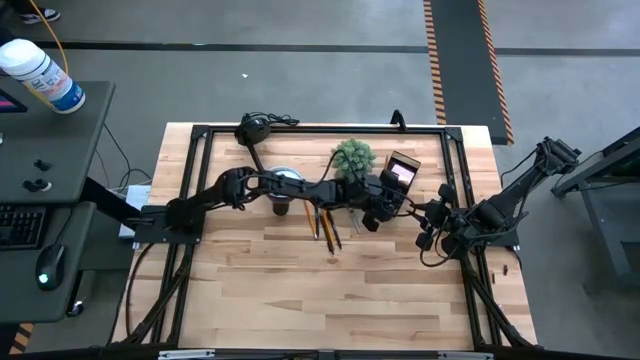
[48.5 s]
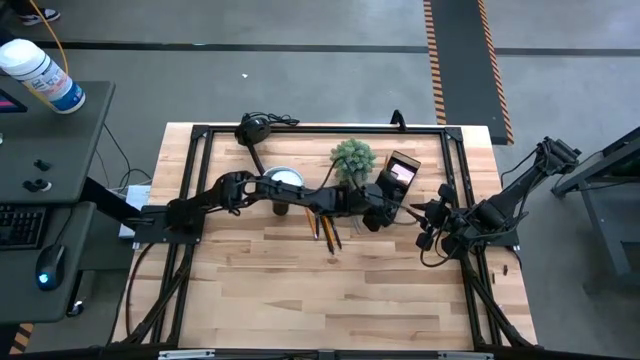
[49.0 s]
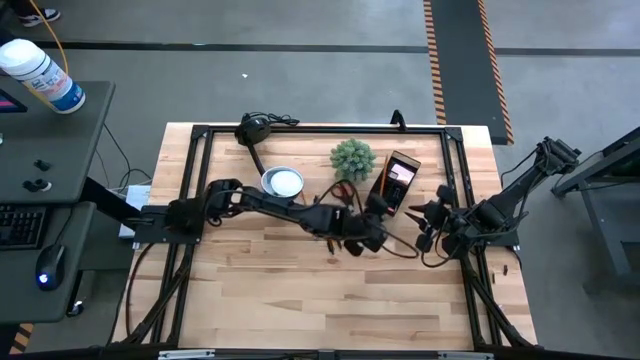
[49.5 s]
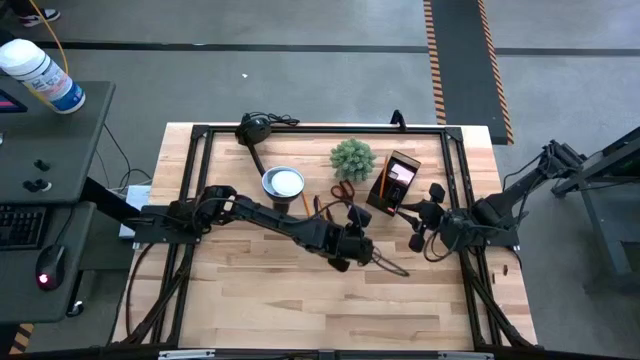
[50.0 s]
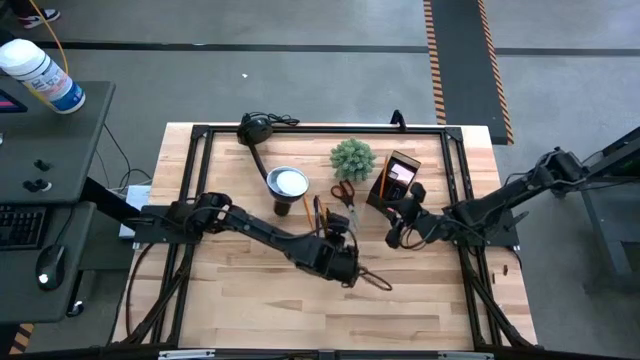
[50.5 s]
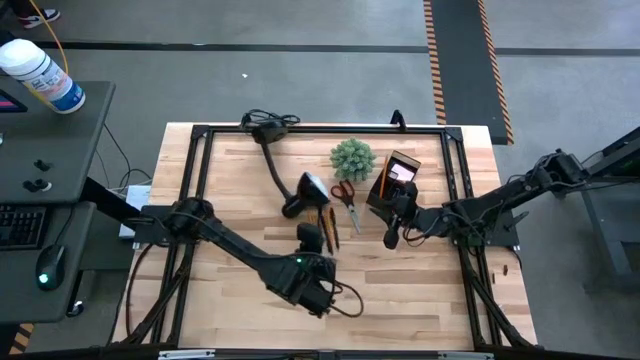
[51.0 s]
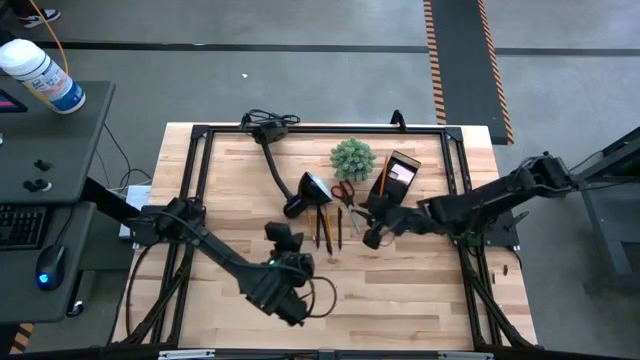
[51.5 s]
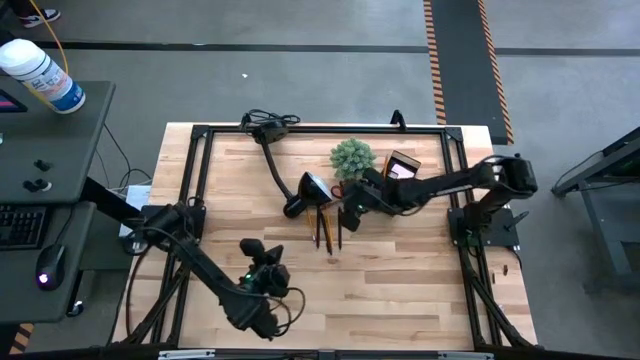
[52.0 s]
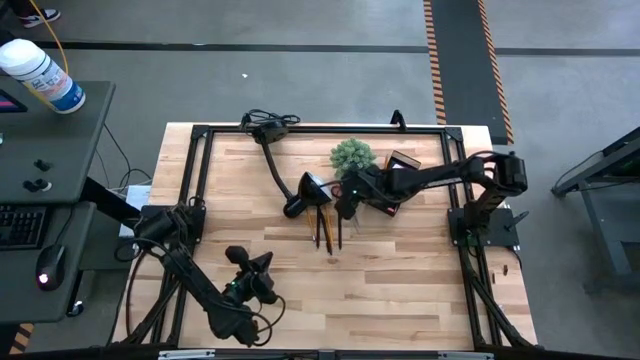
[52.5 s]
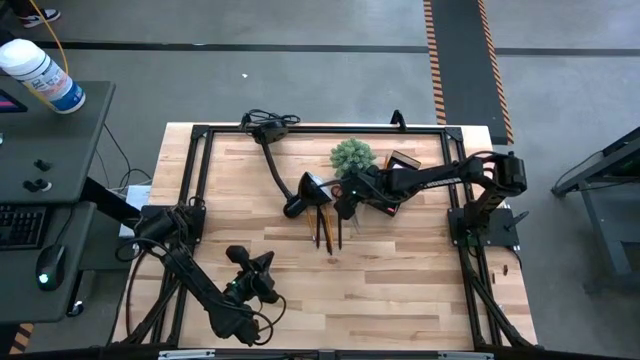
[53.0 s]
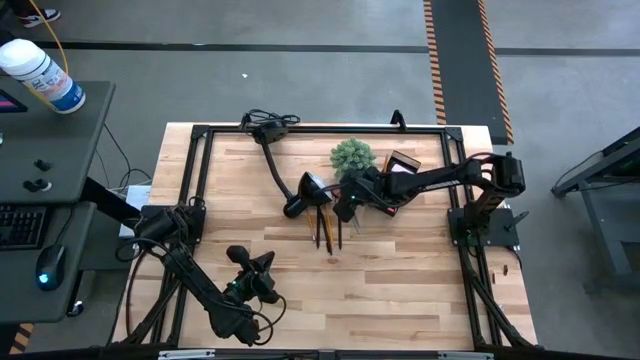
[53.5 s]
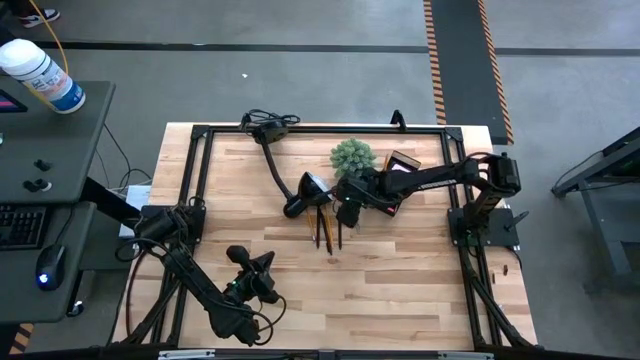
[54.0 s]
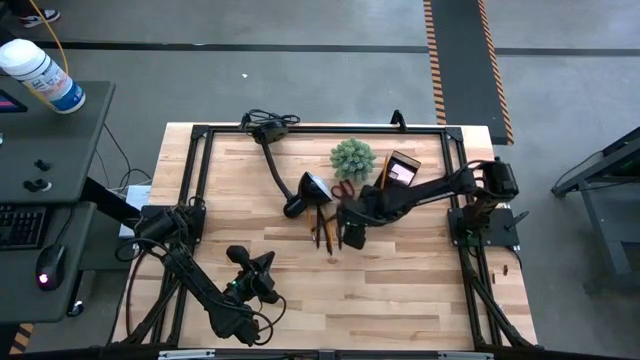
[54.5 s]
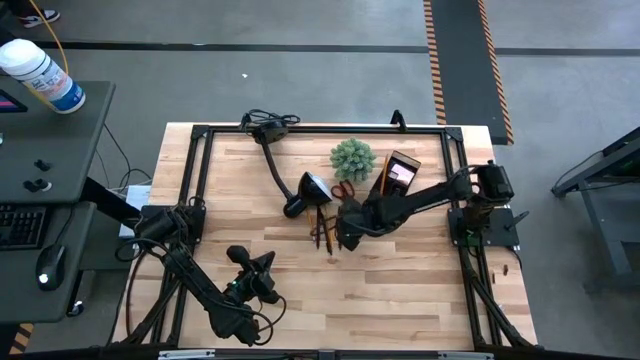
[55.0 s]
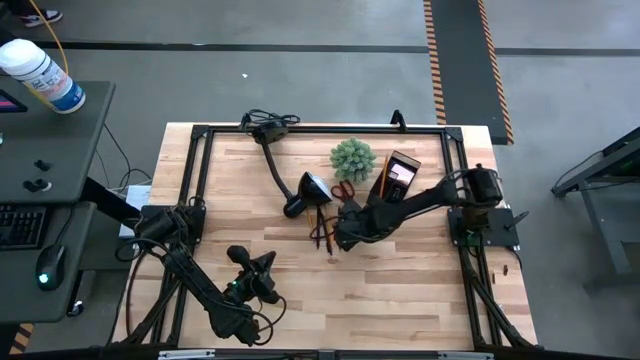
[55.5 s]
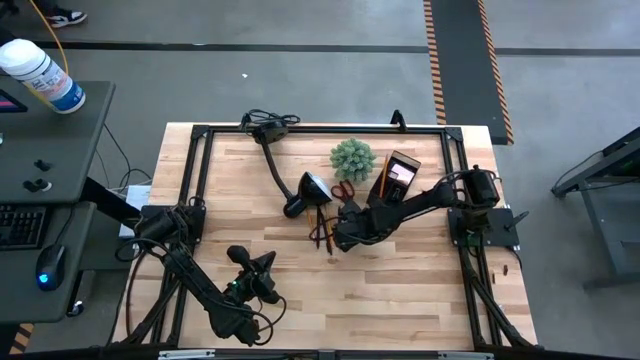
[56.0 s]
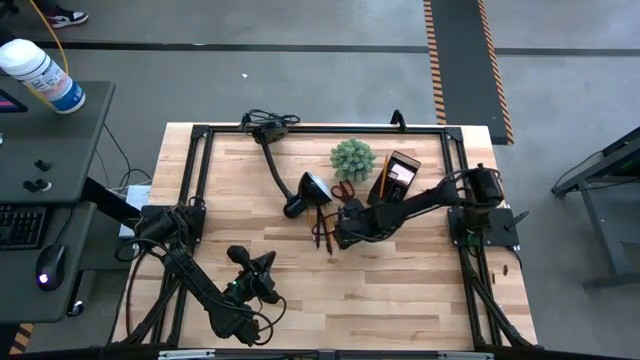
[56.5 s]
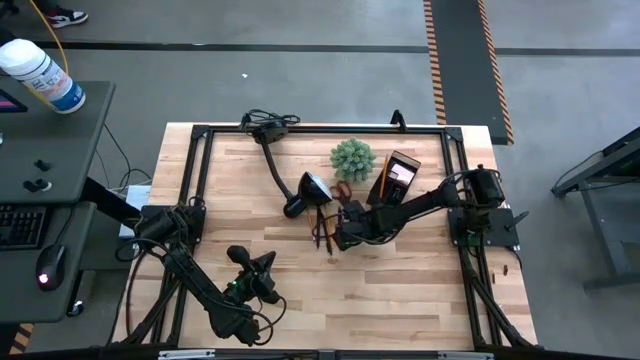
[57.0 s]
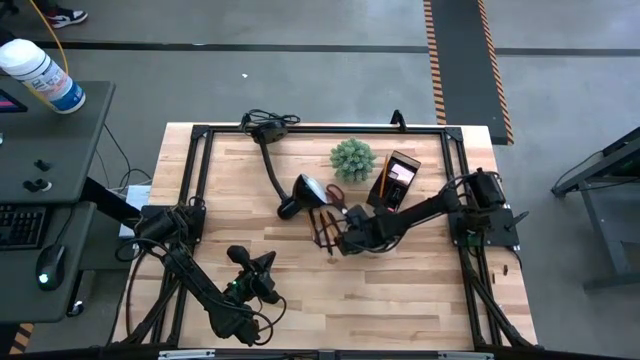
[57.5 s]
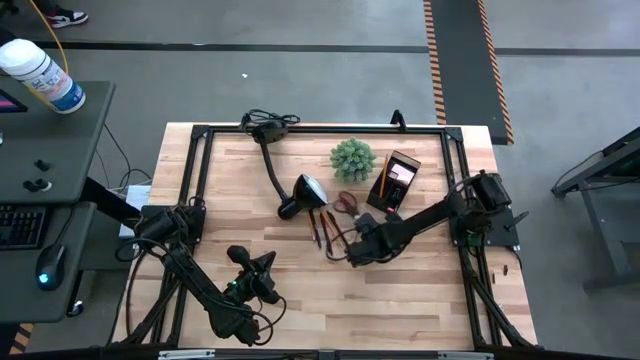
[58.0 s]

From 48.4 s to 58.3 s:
Task: Pick and place office supplies into organizer
Put the black scissors into the desk organizer

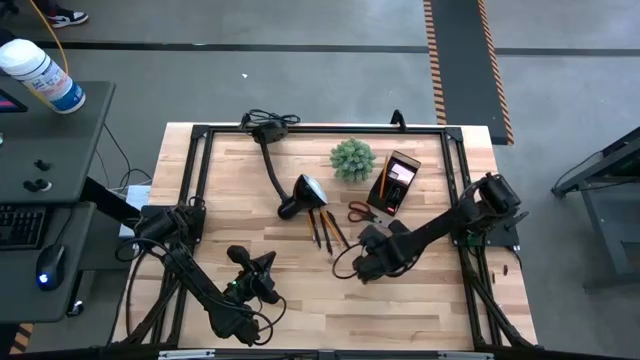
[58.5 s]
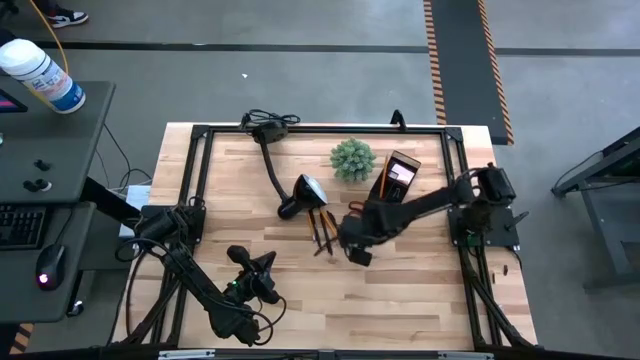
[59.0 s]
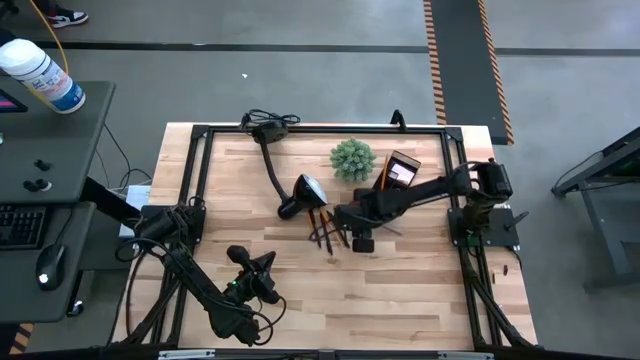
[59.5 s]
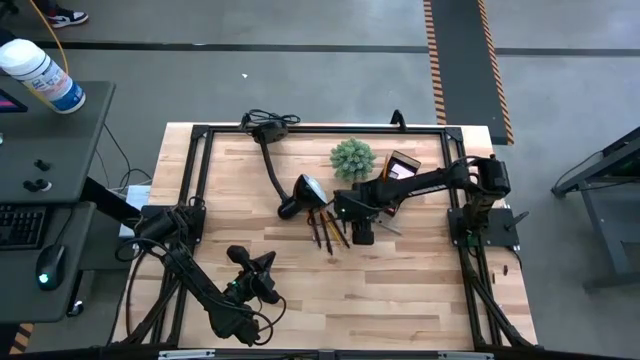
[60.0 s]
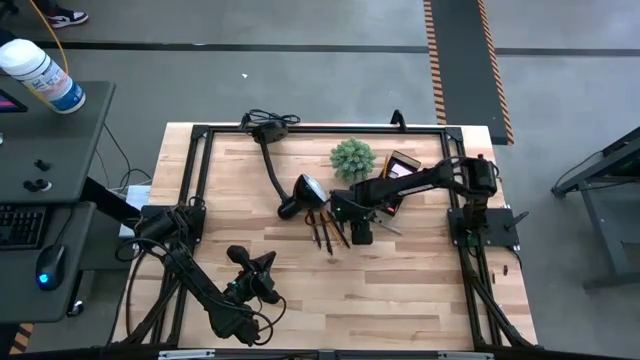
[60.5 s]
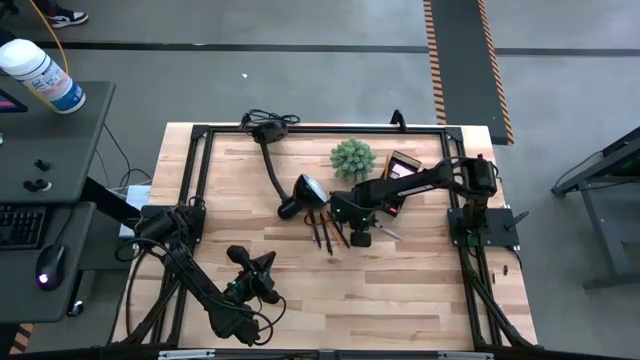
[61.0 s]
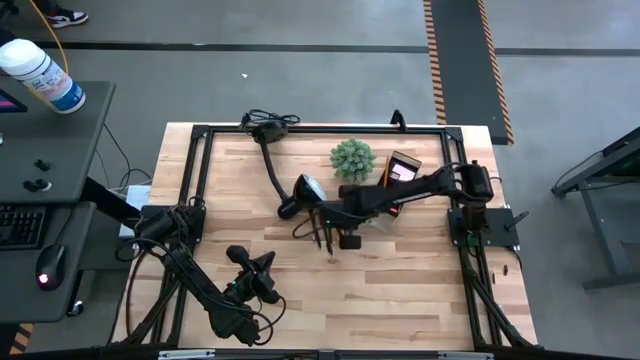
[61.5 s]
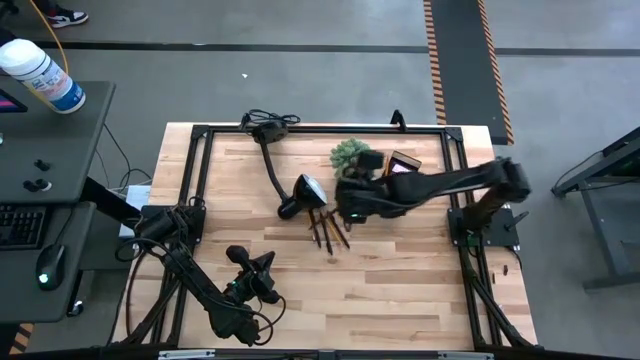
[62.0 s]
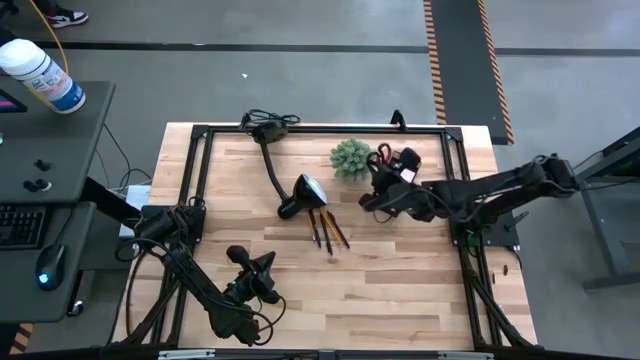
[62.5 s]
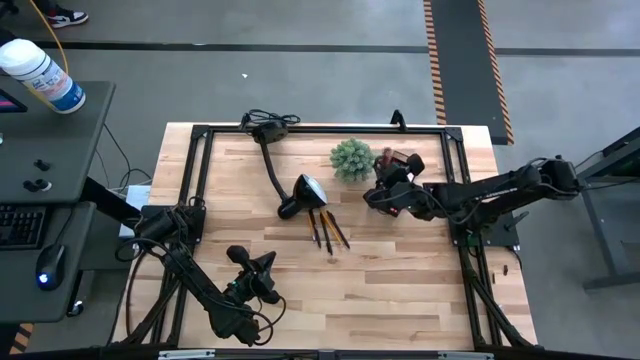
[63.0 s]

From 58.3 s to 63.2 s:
Put the black scissors into the desk organizer

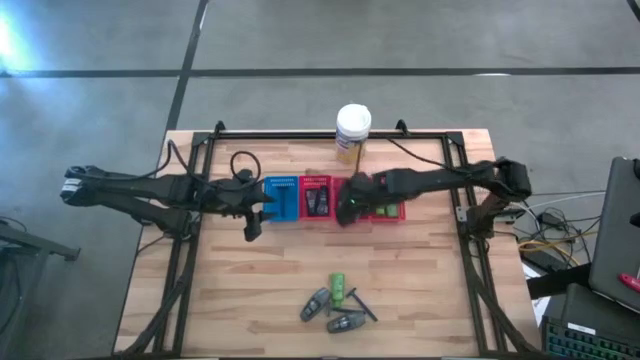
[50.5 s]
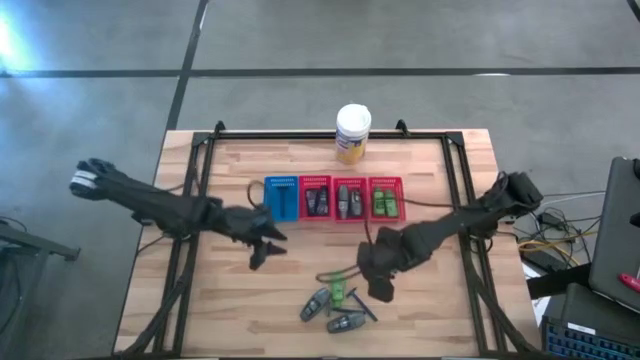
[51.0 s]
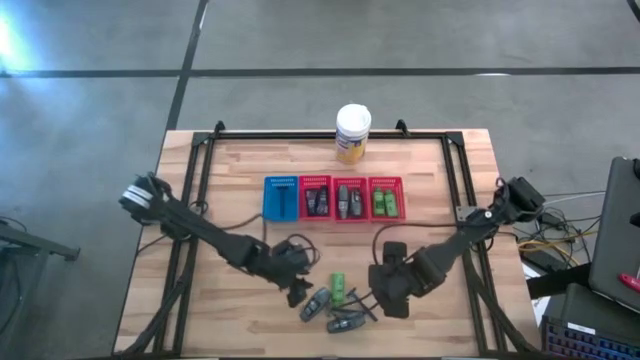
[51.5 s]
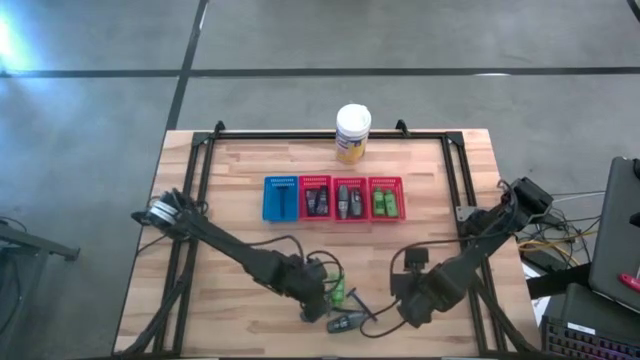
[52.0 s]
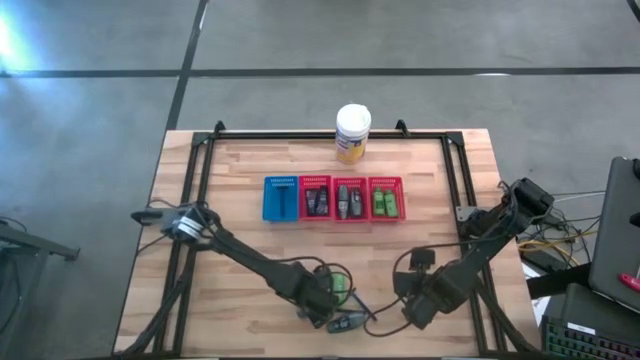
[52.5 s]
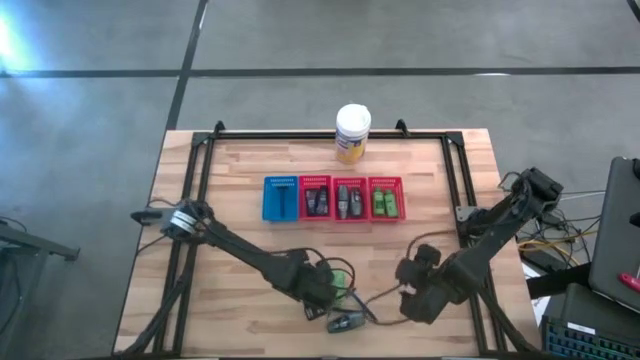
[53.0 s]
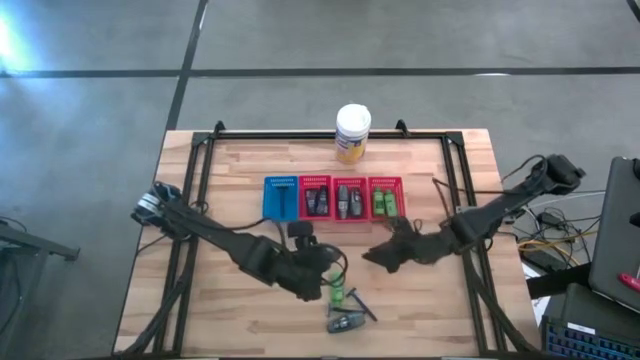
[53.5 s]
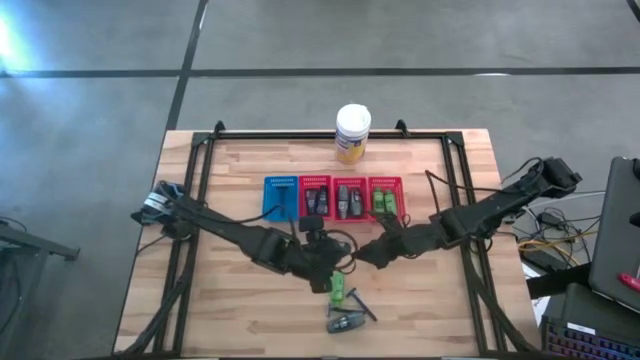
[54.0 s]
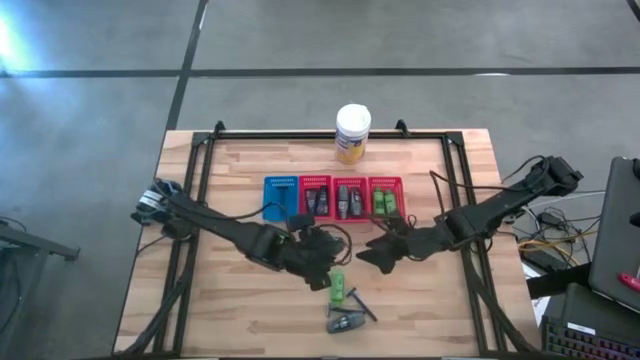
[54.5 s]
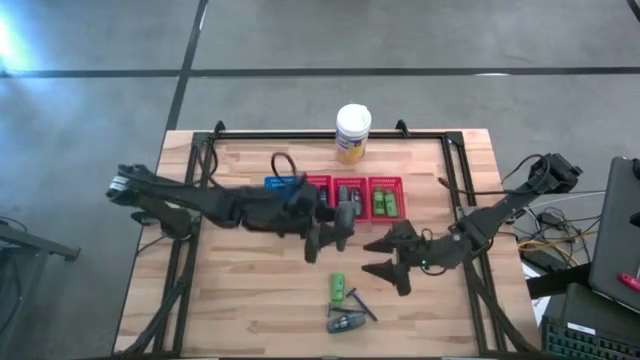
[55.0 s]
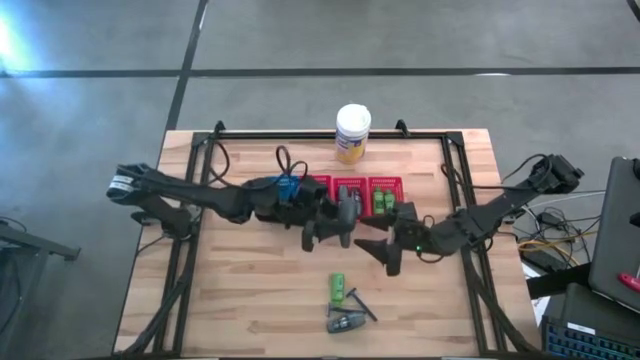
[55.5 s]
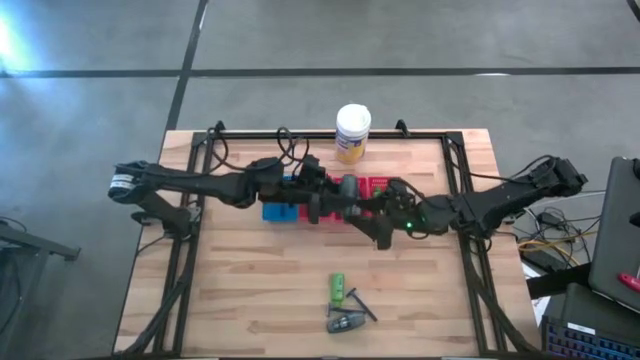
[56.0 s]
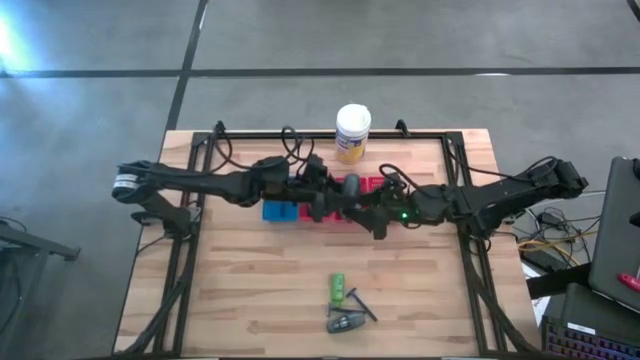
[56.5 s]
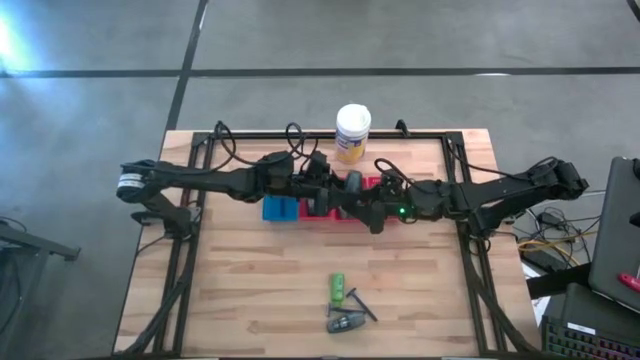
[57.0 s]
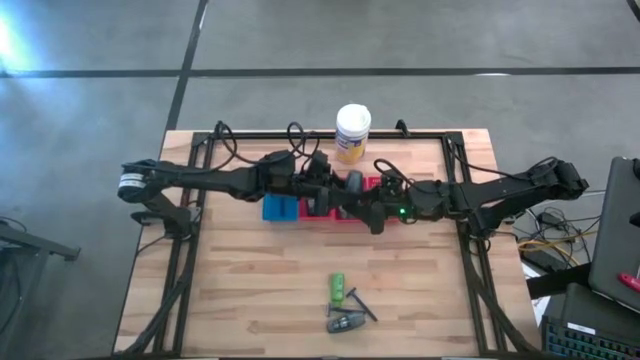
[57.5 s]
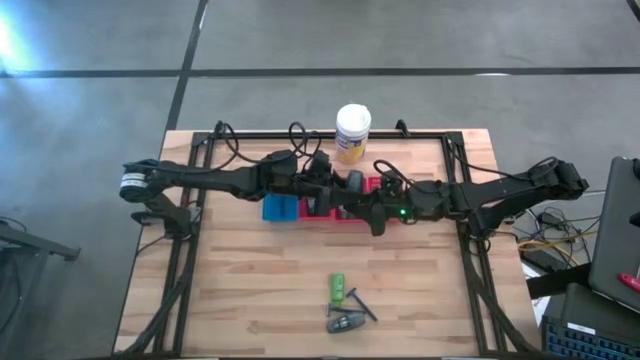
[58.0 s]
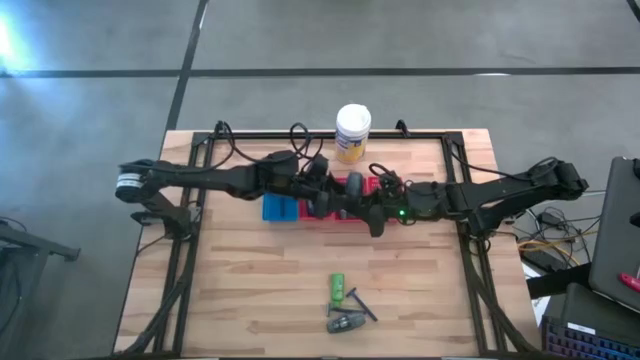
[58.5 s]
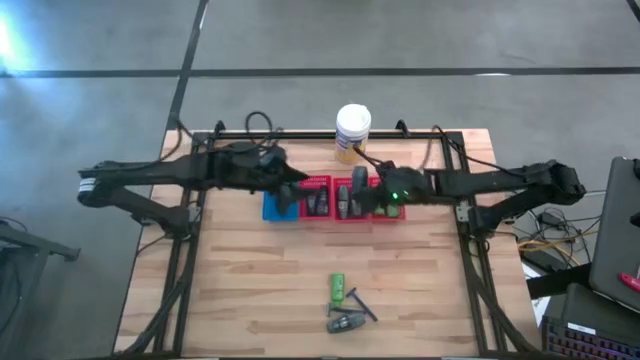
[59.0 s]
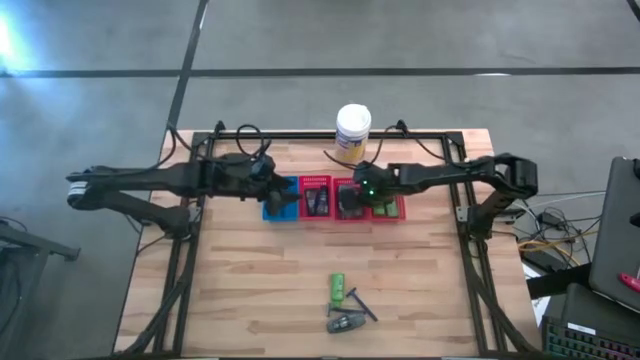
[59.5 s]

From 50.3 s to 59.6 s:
Task: Pick & Place Travel size toiletries
Put the black deodorant into the middle red bin
